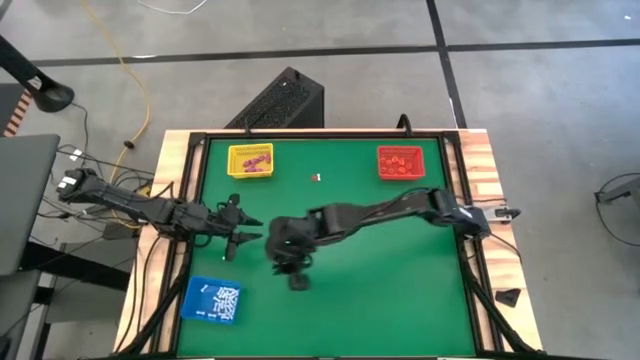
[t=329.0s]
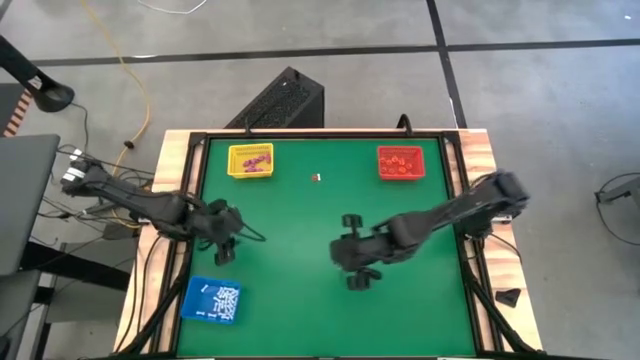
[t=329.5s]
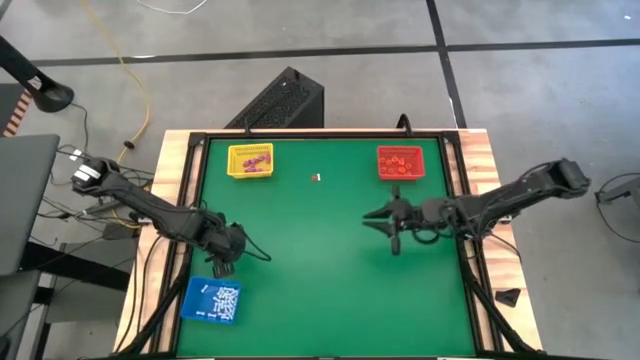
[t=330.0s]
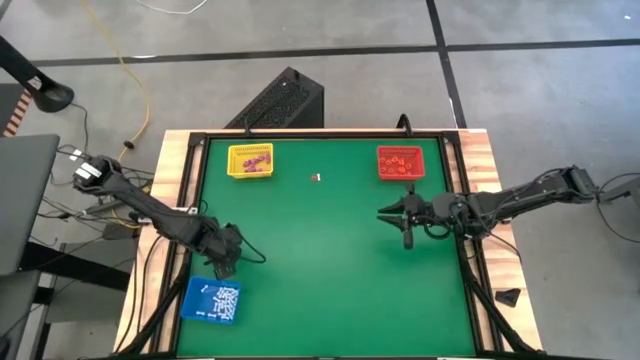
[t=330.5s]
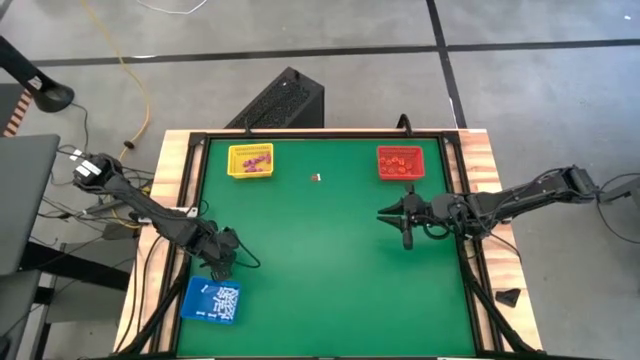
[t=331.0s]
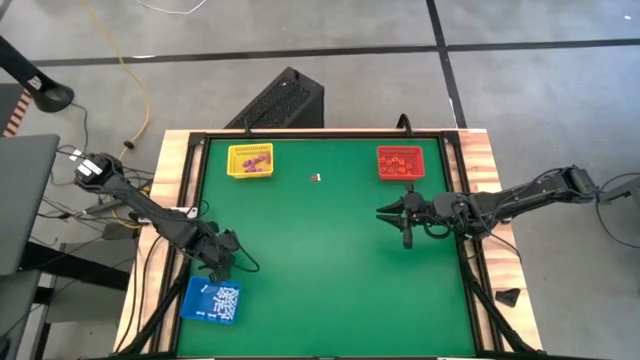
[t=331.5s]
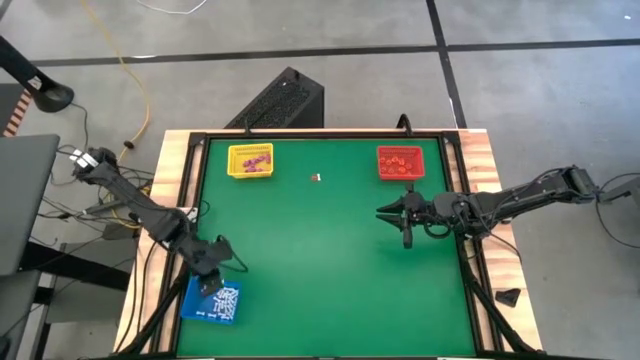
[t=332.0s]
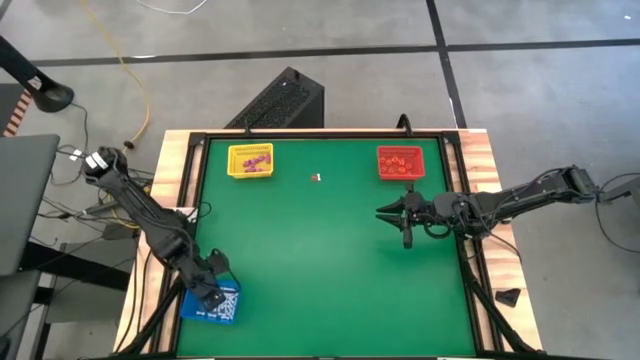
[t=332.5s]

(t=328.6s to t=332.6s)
Task: Sort Halloween decoration
Put the white bone toy into the blue bin

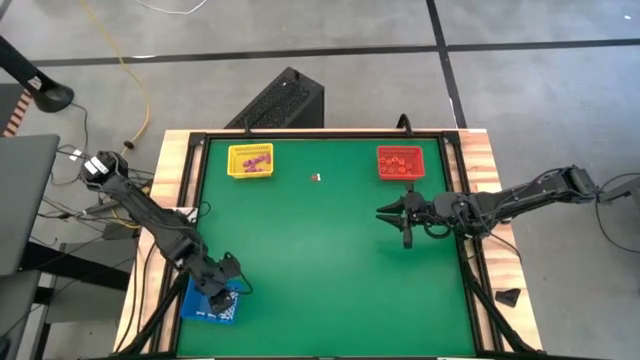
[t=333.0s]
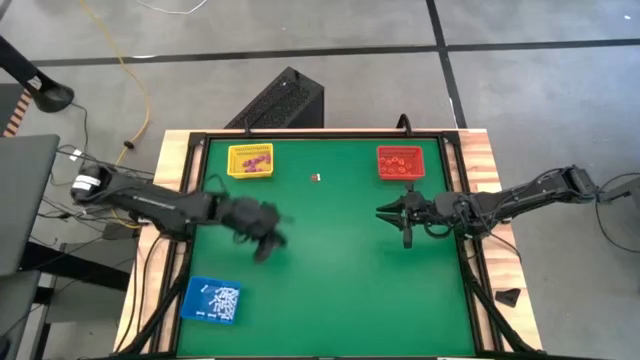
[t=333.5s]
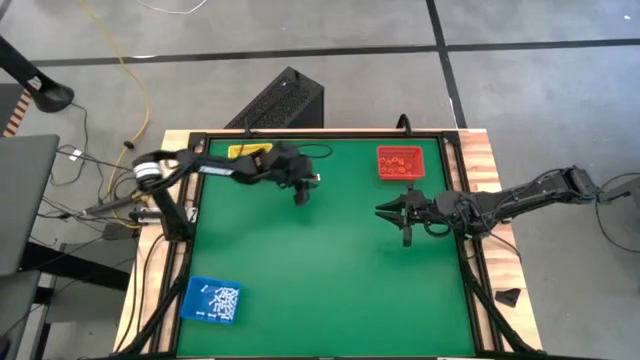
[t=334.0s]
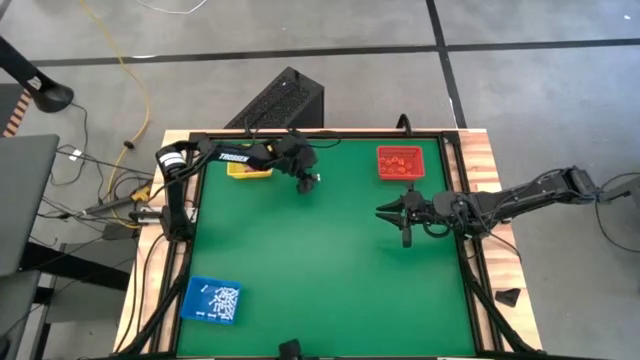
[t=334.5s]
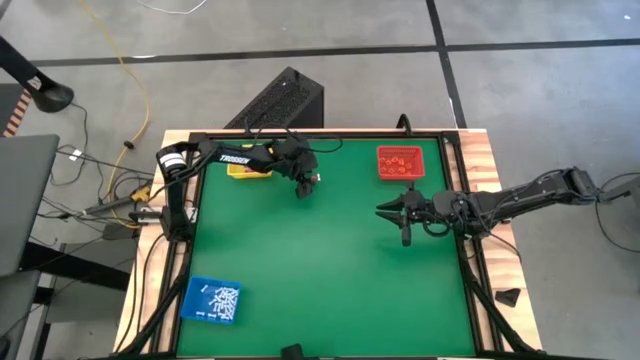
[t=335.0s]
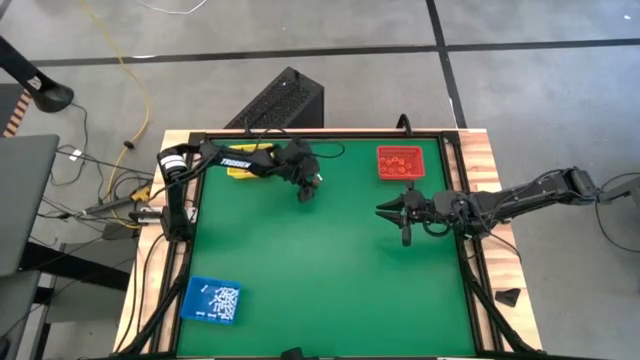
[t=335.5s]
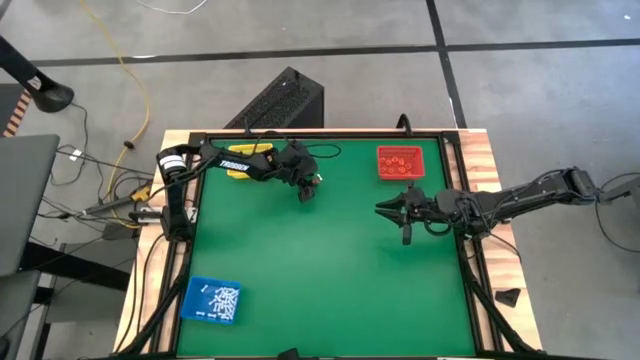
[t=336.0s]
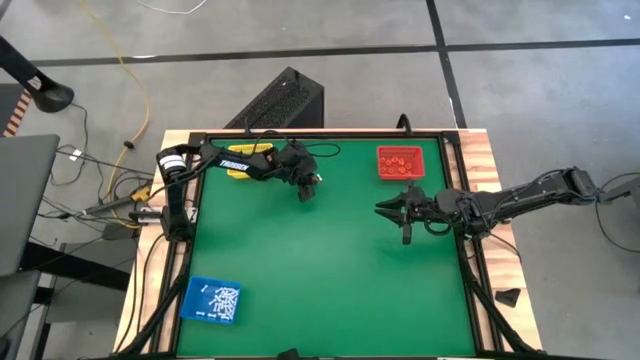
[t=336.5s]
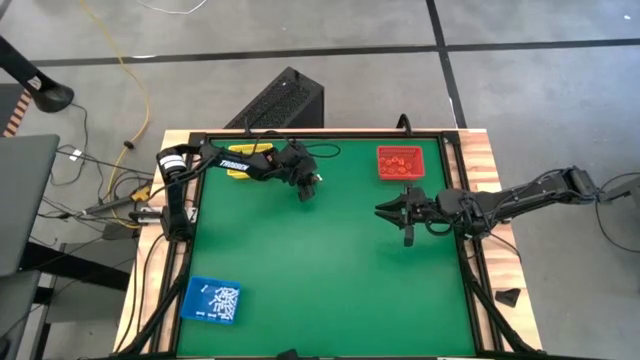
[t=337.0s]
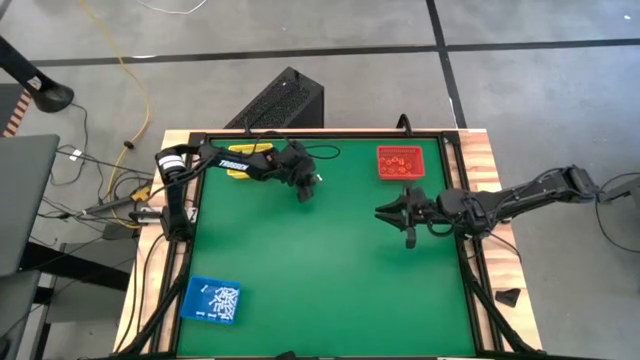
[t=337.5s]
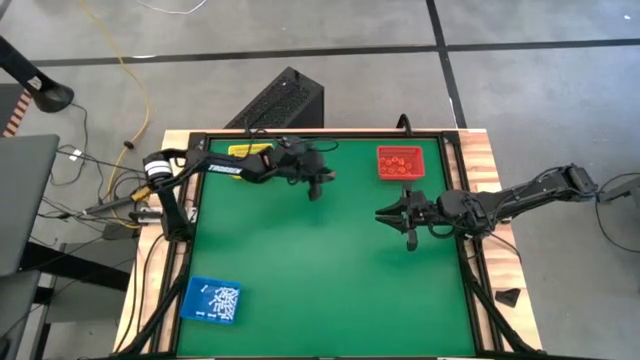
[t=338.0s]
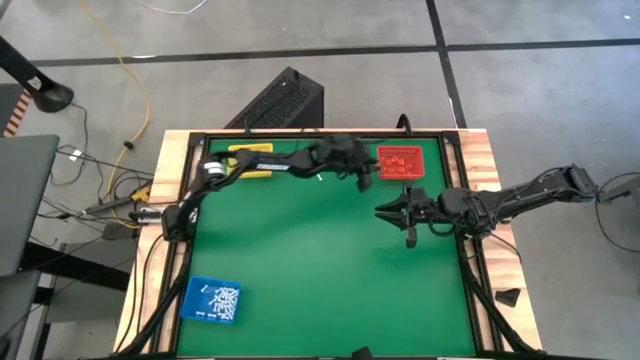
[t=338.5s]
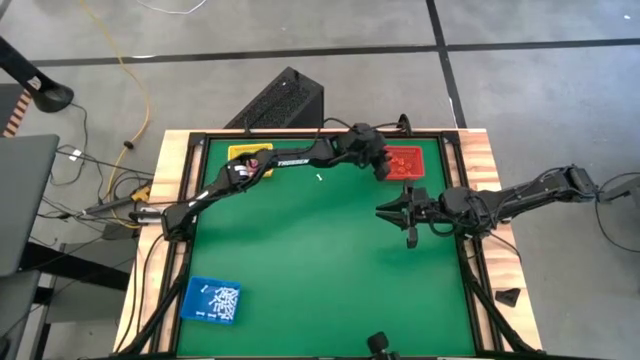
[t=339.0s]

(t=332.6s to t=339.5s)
Put the pumpkin toy into the orange bin

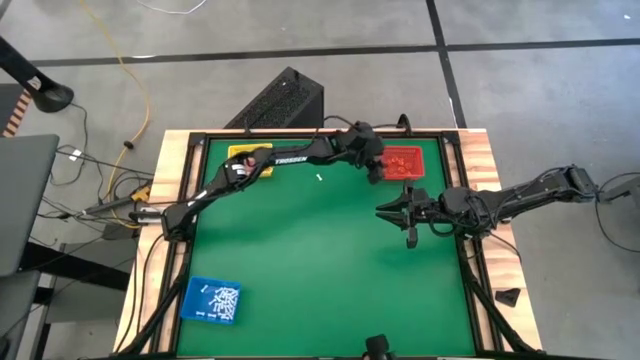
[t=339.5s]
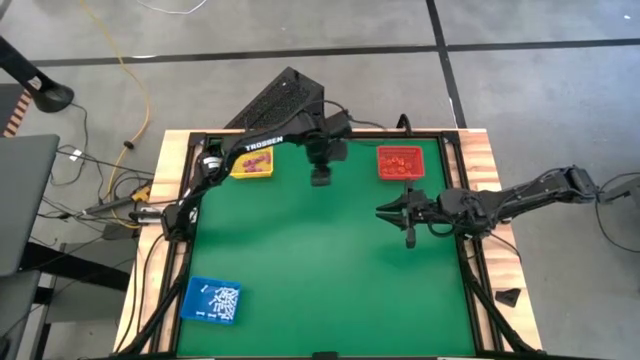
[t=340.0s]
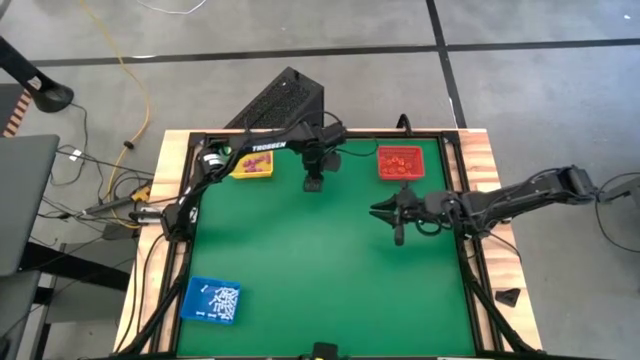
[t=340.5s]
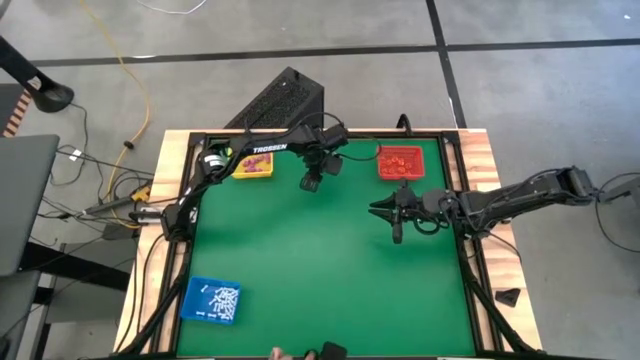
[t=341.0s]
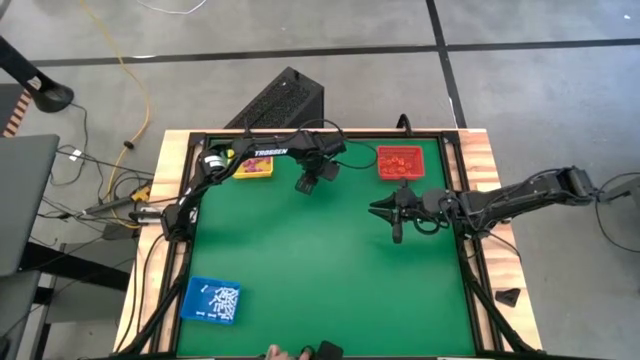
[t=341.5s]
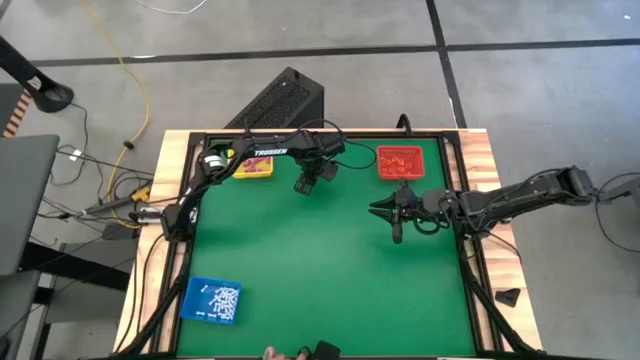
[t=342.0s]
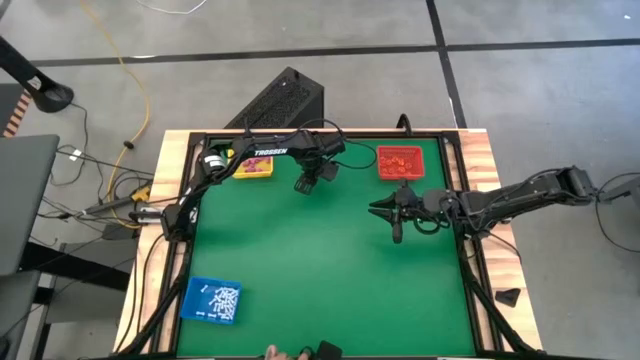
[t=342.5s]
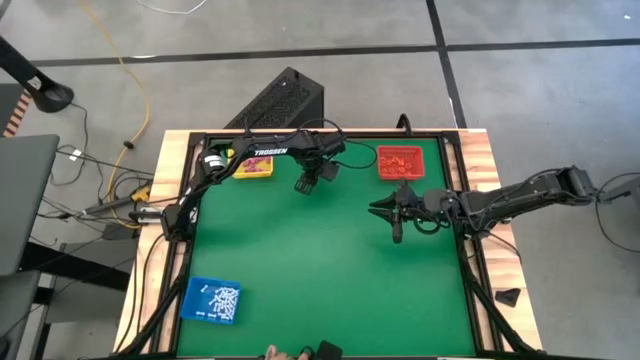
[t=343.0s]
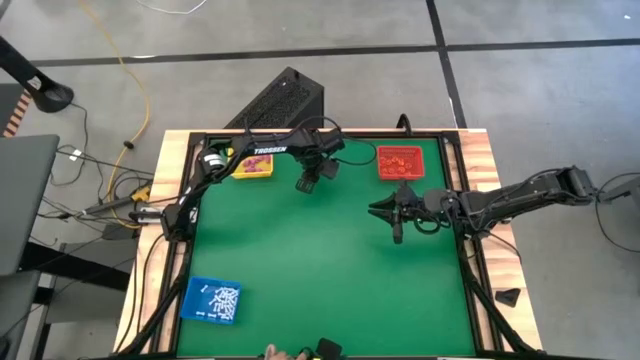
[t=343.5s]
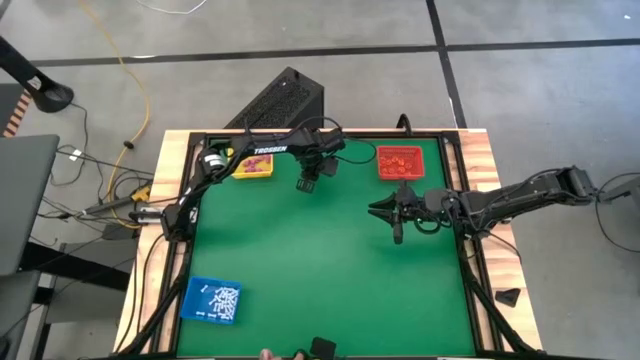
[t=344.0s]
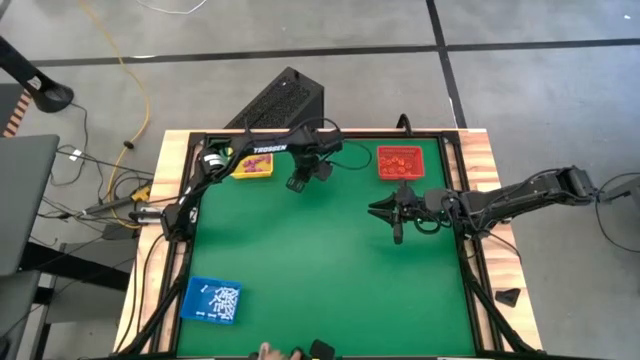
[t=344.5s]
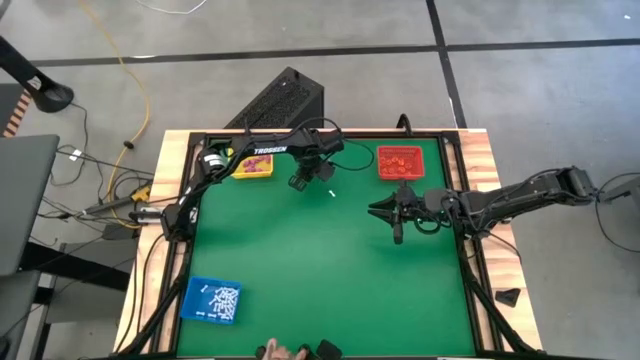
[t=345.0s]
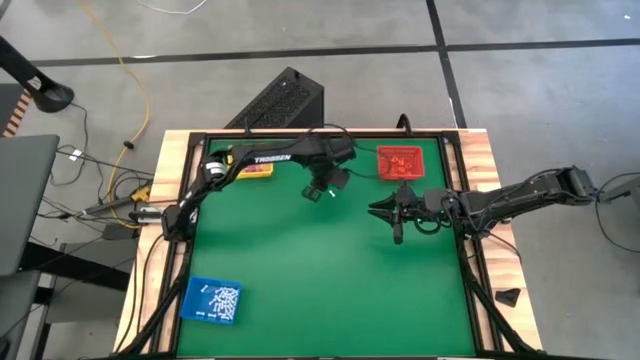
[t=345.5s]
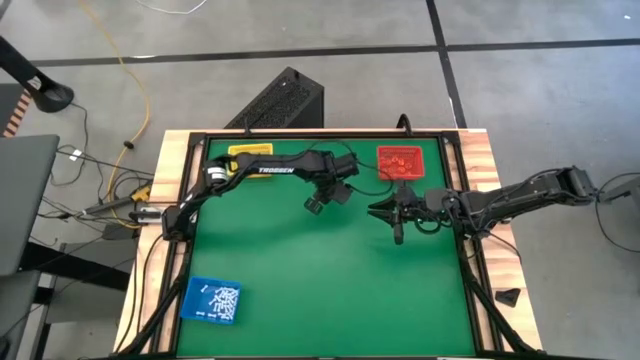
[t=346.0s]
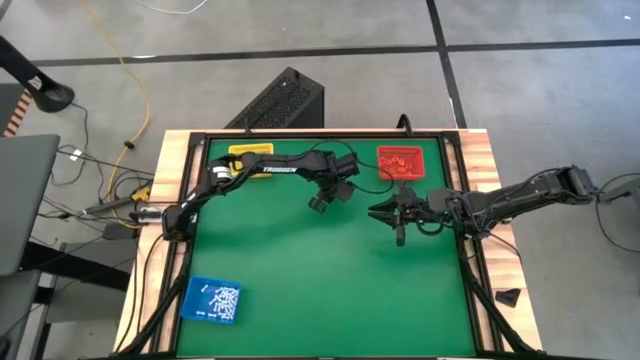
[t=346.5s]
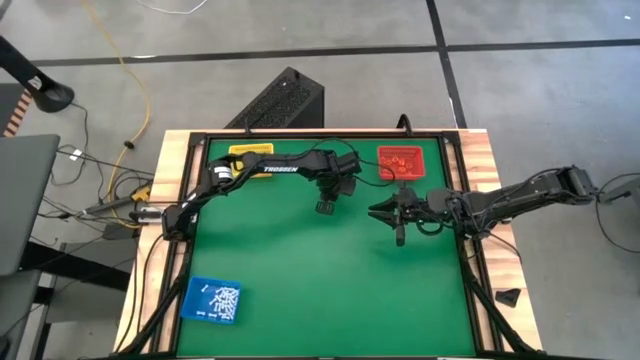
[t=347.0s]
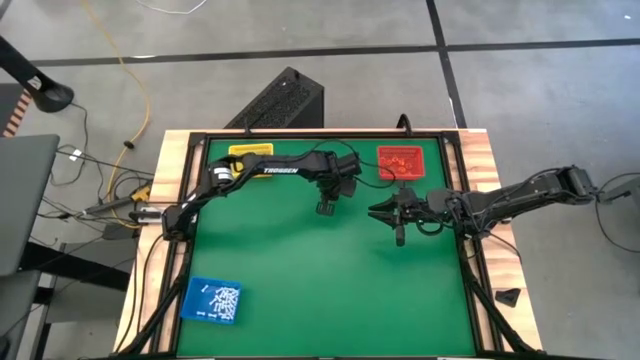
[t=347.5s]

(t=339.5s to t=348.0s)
Put the white bone toy into the blue bin

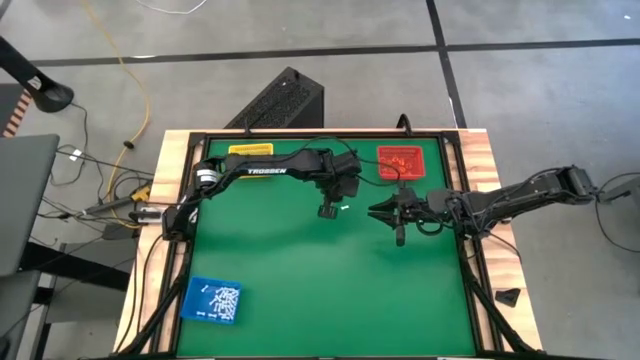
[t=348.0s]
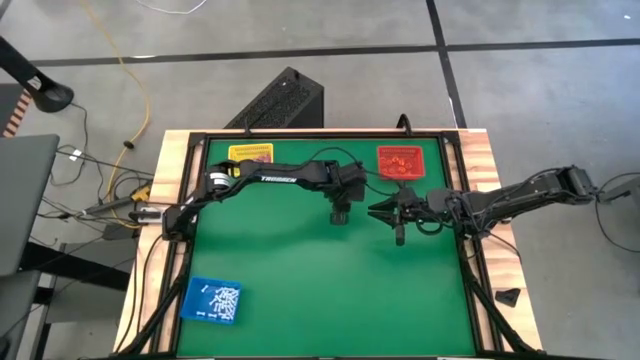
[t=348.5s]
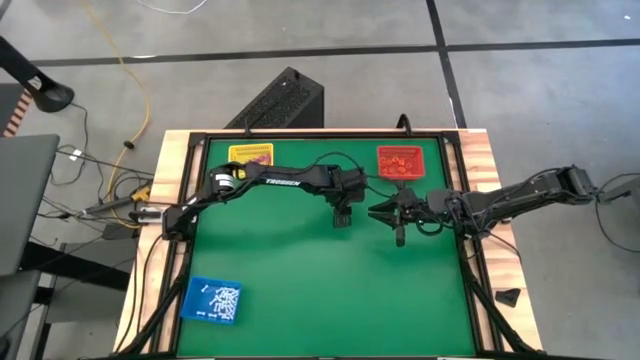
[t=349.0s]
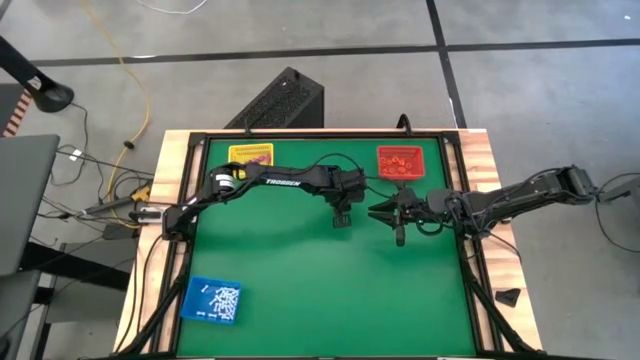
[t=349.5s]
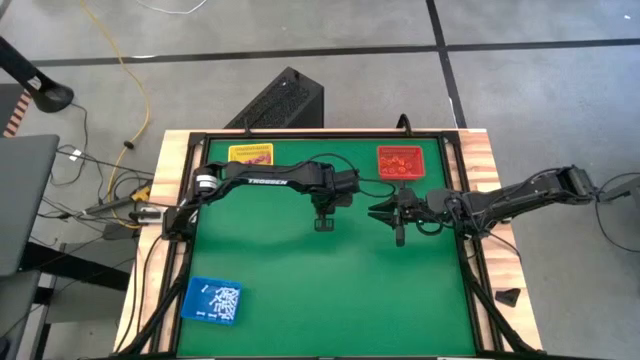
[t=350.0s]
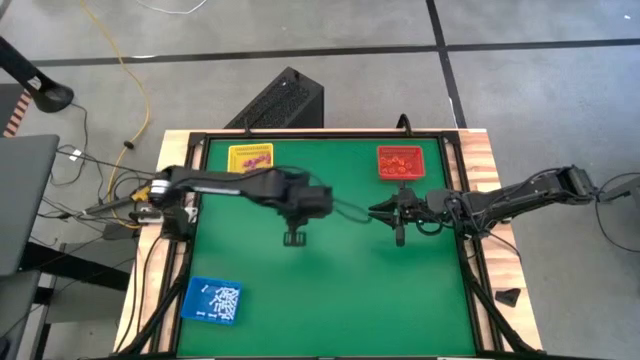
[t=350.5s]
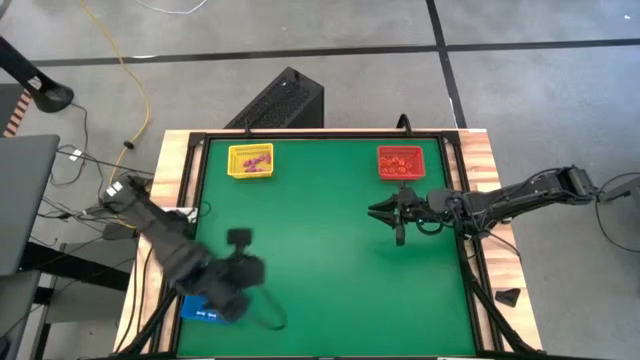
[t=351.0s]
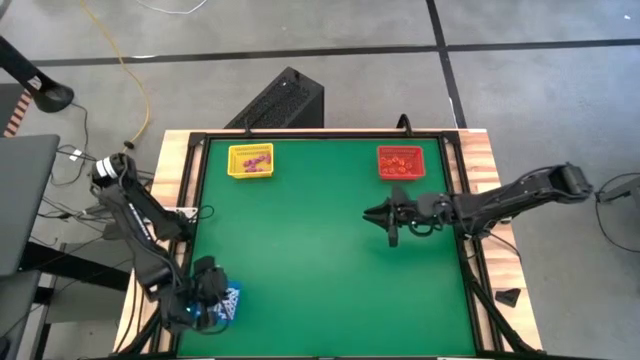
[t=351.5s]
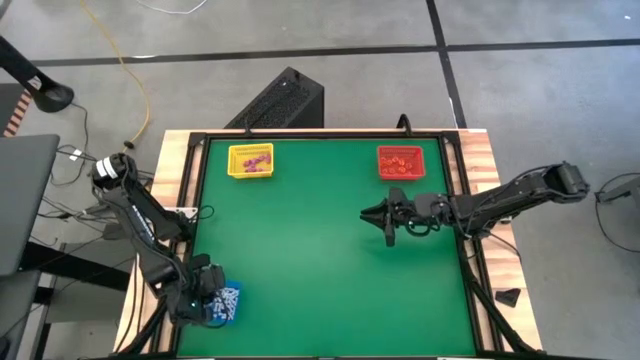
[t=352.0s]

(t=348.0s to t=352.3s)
Put the white bone toy into the blue bin
